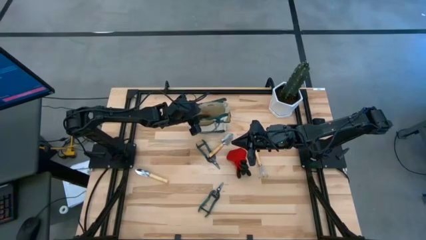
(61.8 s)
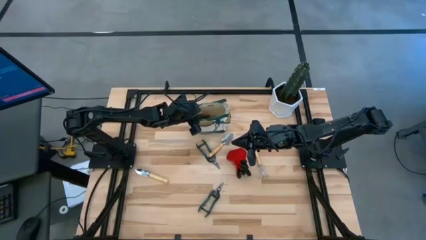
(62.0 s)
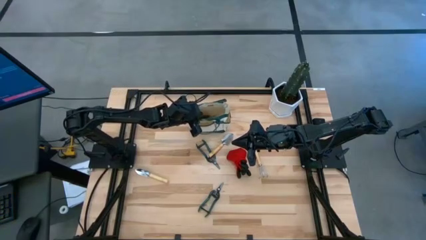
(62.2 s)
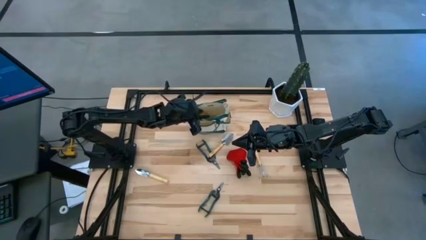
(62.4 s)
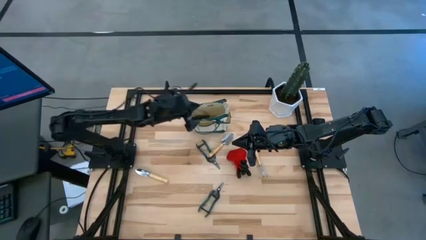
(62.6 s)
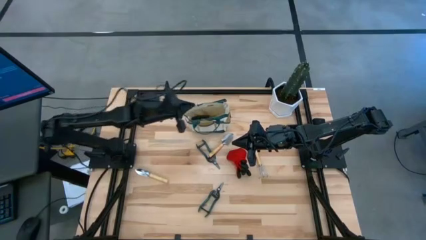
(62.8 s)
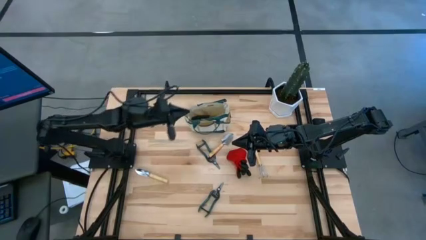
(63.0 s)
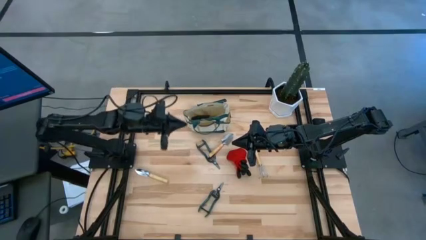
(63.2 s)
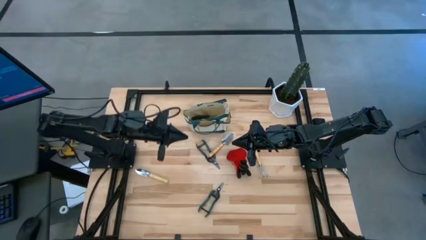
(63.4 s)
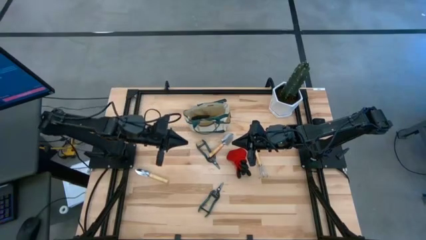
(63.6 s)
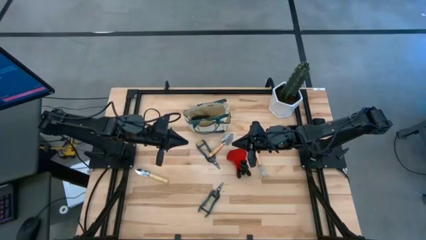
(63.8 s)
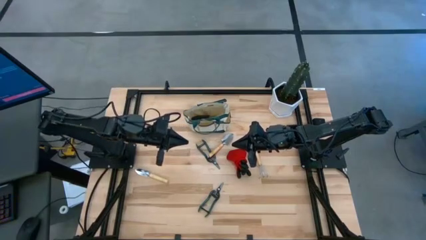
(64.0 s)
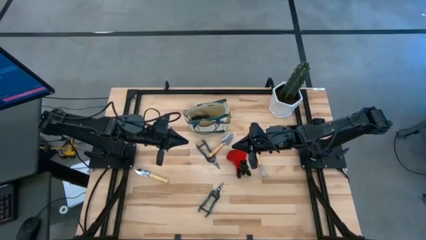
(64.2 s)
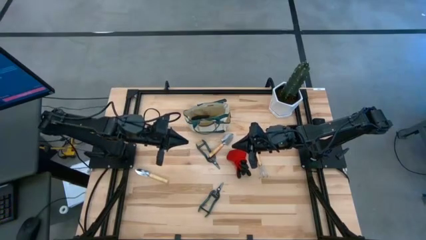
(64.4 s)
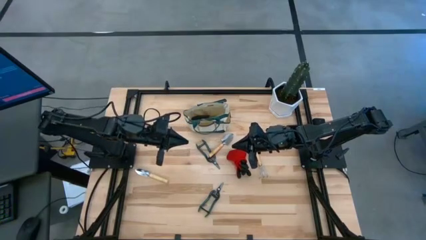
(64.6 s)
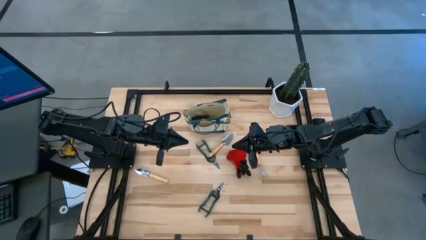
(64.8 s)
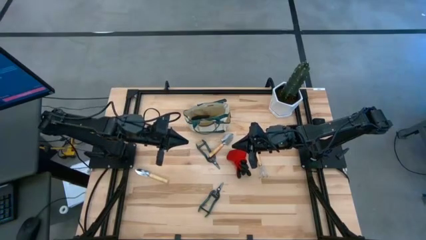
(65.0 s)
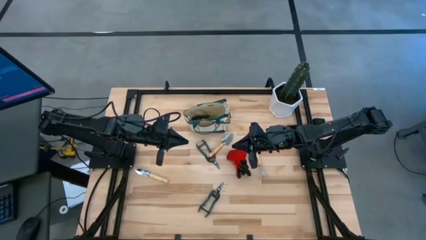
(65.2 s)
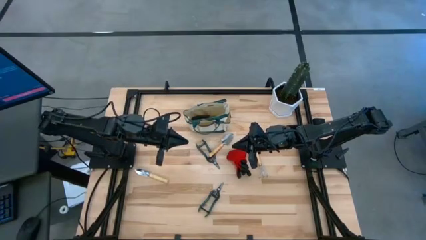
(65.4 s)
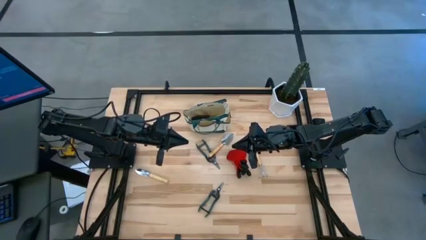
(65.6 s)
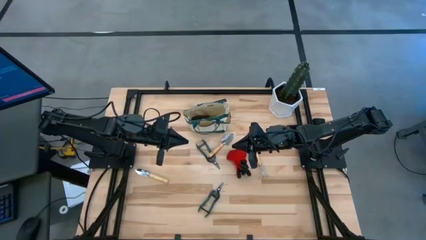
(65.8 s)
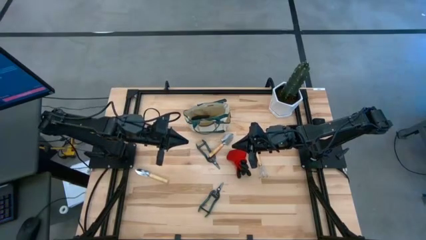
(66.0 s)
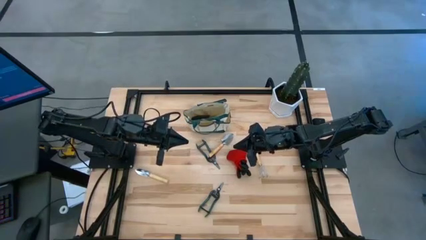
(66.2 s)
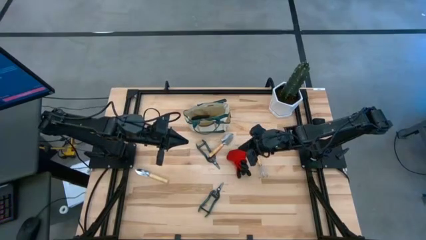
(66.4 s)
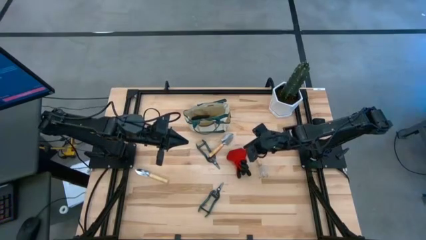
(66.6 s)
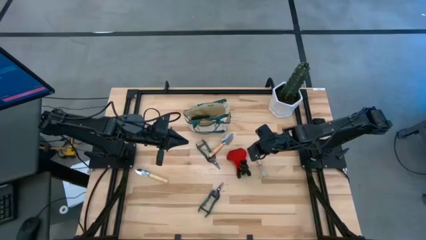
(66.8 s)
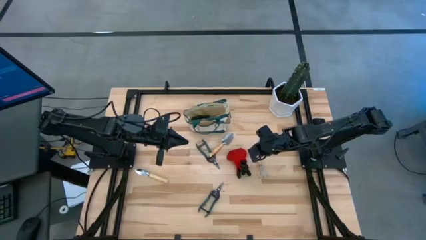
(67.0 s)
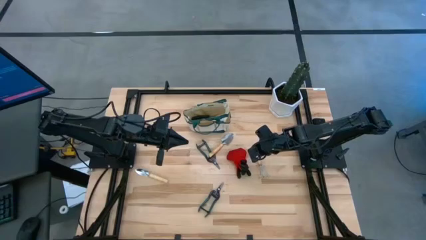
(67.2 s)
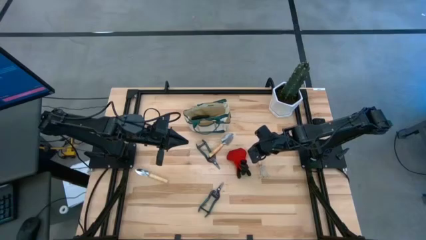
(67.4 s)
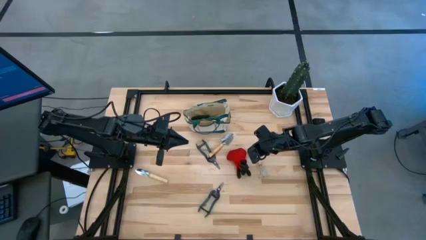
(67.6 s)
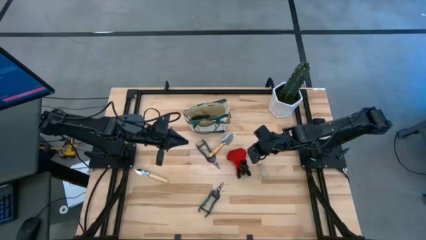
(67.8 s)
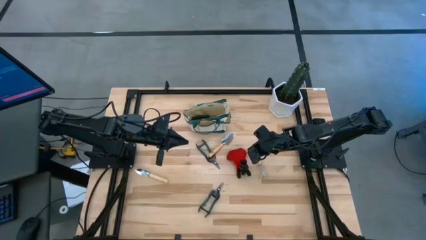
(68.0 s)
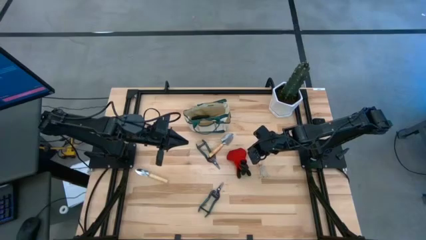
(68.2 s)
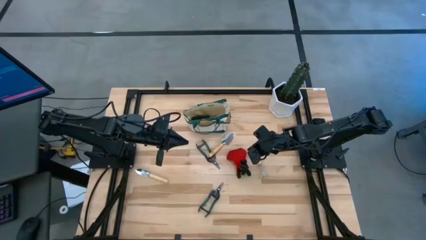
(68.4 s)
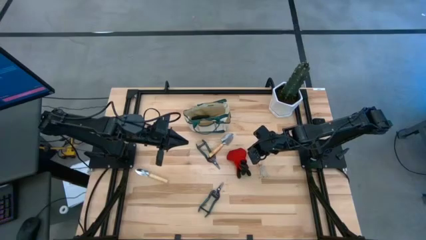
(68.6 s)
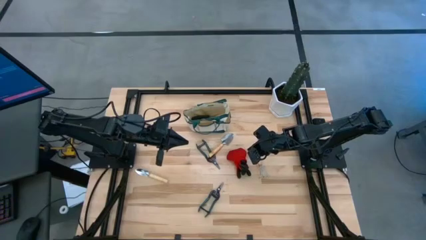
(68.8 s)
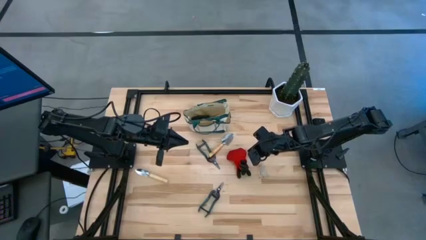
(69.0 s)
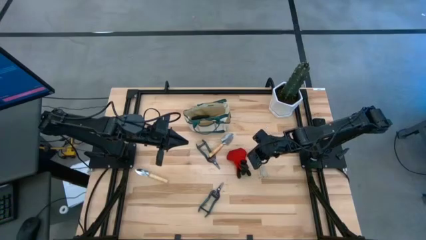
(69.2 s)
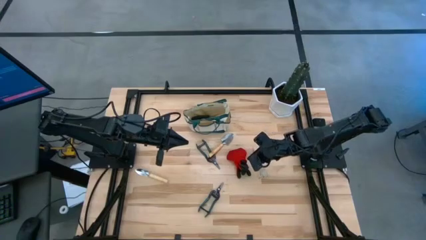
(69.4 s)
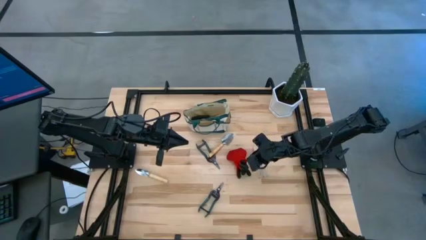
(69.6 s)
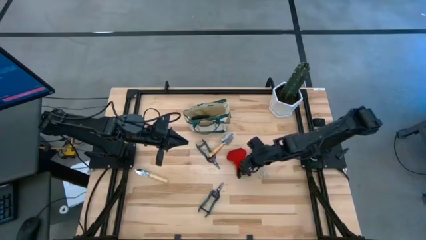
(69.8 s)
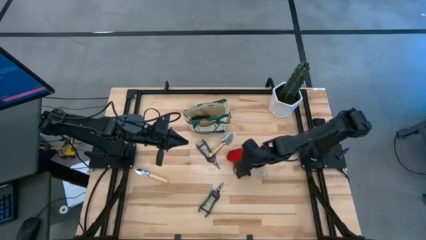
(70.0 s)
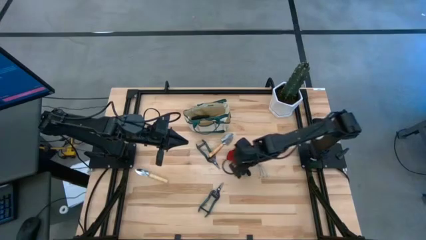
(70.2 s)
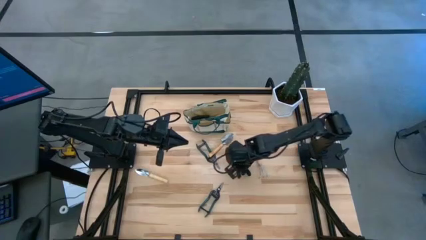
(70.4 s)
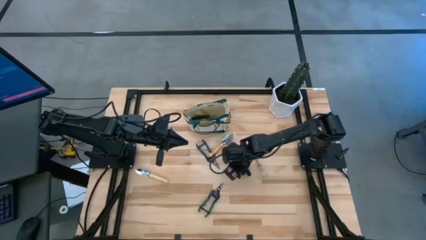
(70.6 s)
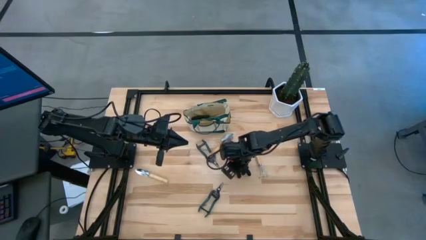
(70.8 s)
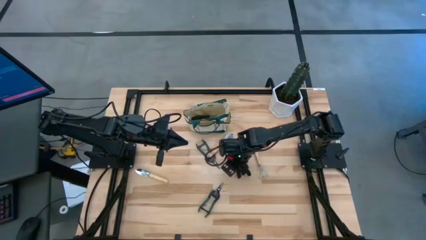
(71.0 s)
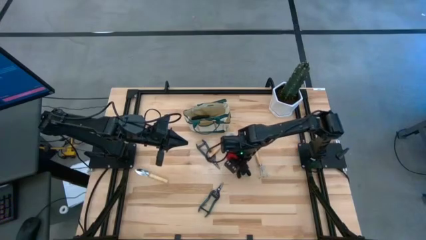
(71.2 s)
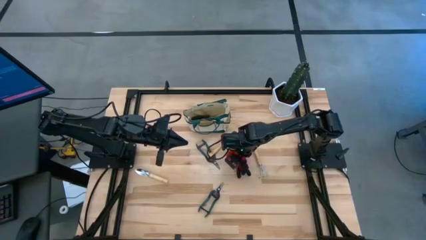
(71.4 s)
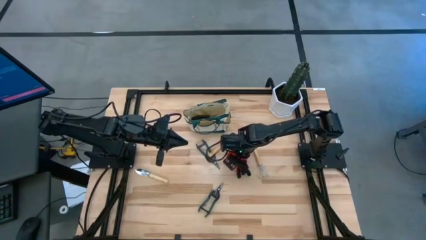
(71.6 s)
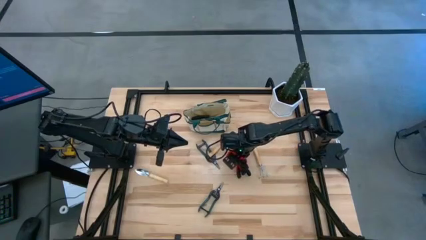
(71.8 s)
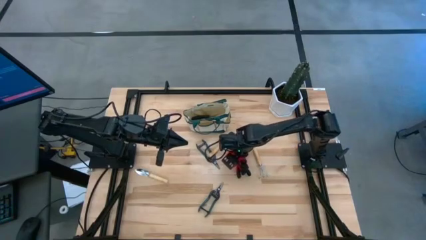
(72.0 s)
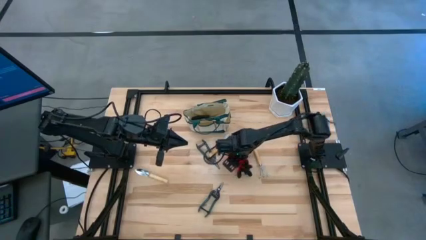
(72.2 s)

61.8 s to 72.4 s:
Task: Pick & Place Garden tools in Gardening bag
Put the red gloves into the brown gardening bag

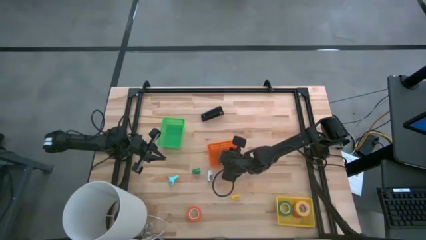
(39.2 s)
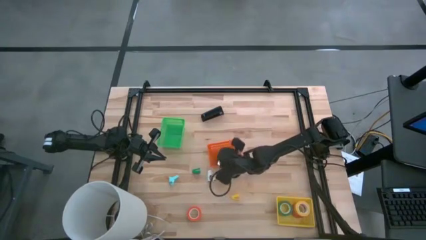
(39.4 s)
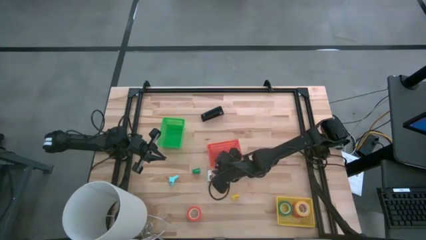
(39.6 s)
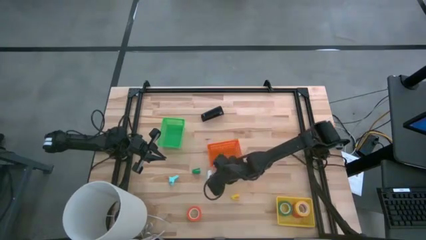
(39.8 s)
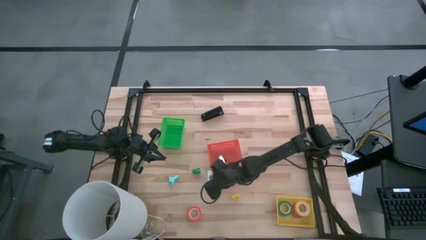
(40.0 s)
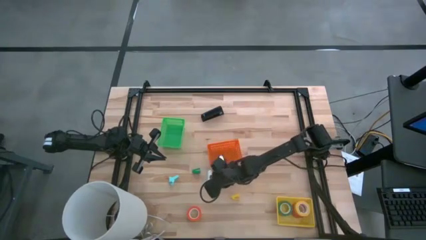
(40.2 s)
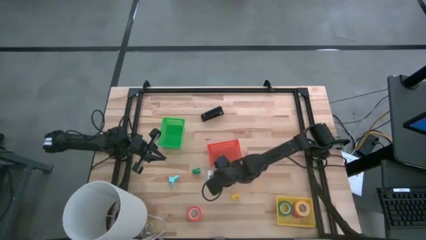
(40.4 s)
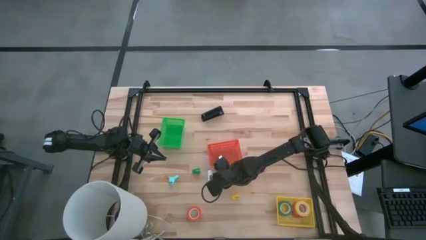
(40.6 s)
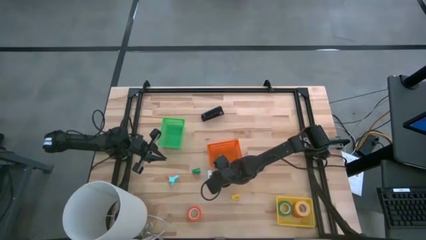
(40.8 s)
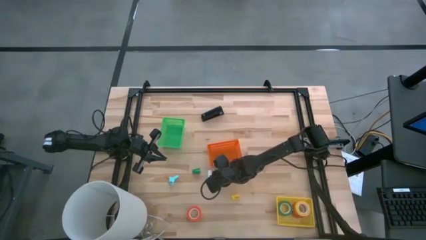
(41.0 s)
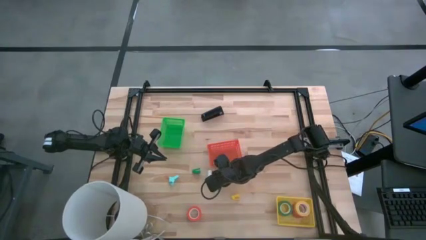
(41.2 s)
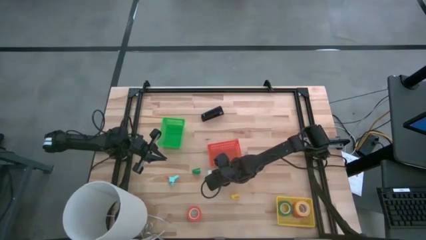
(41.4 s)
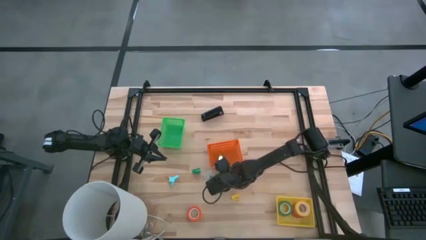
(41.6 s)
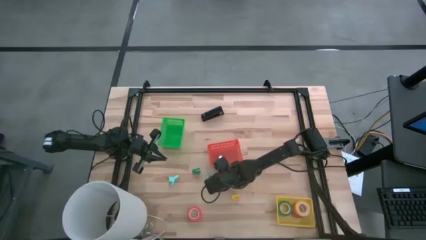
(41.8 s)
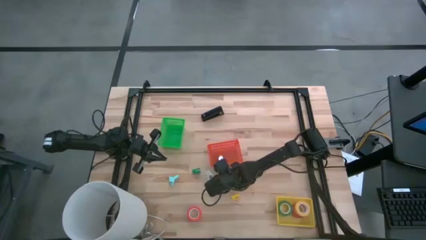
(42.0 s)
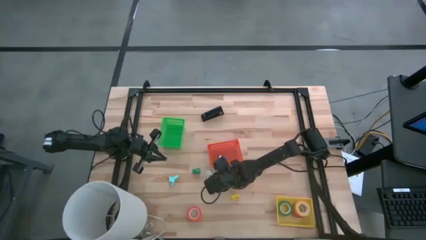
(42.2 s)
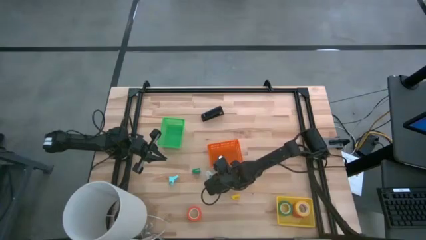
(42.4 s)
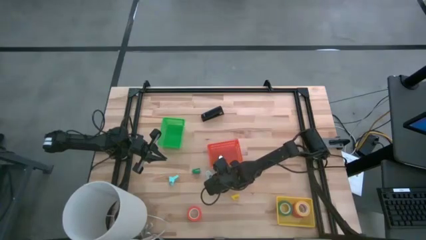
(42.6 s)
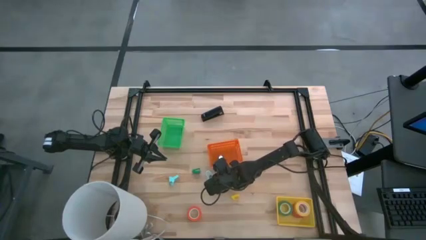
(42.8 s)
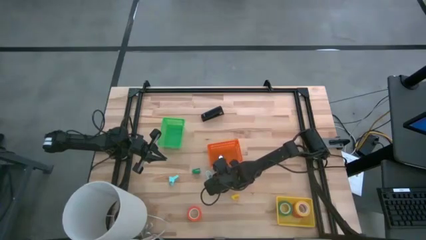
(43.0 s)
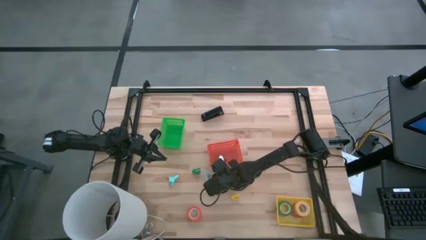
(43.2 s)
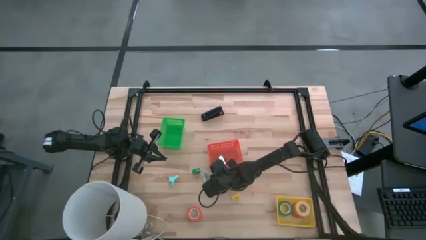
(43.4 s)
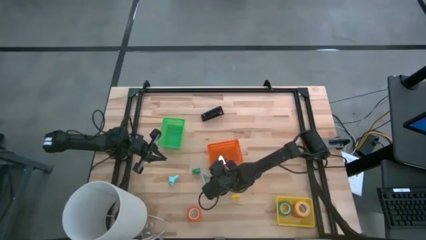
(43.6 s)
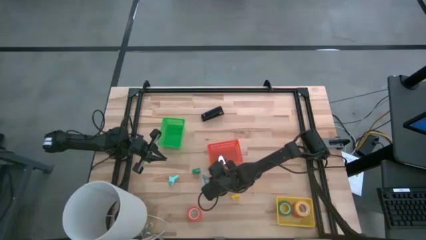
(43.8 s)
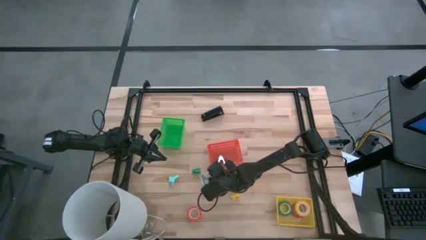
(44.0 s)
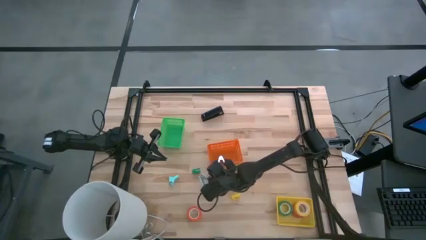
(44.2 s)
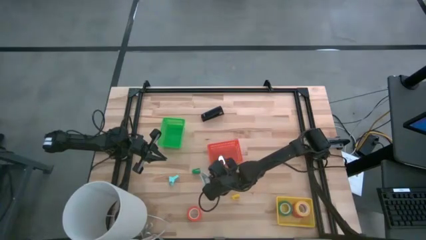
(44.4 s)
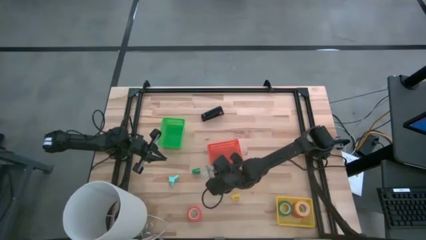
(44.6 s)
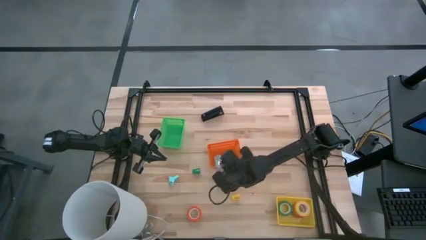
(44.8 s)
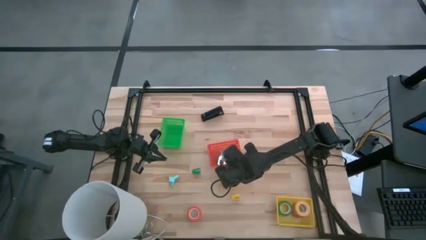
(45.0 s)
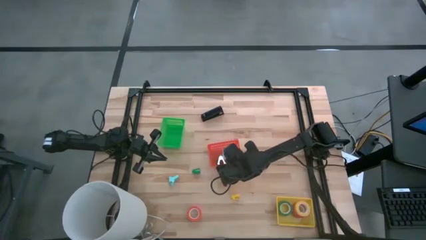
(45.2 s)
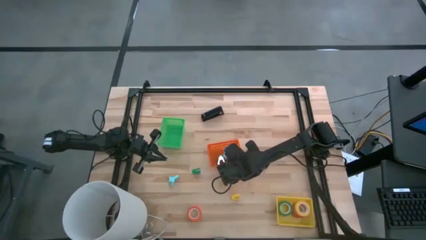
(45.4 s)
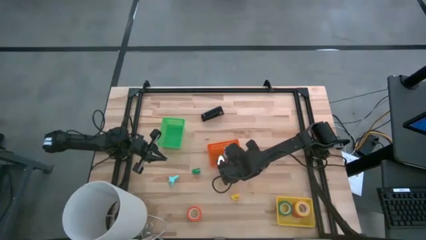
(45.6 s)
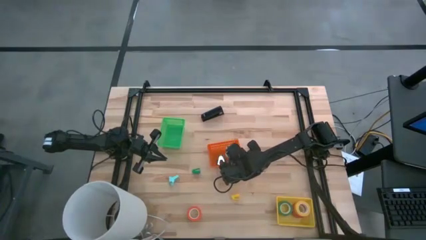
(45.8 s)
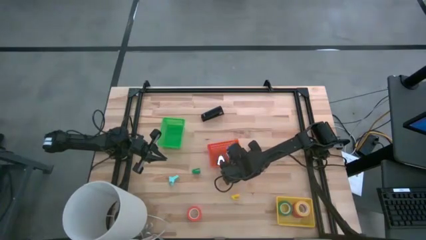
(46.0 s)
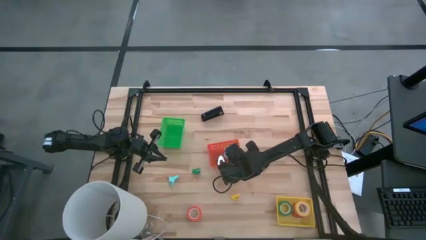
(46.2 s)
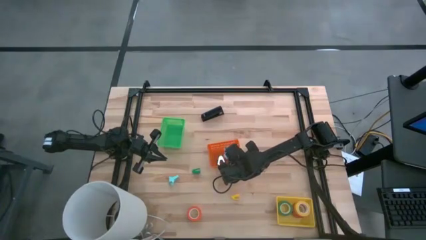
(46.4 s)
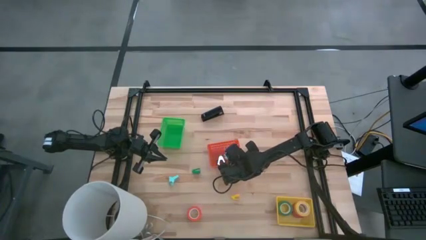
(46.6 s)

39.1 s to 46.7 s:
Task: Pick and place Stapler, Stapler remover, tape
Put the right blue staple remover into the orange bin
